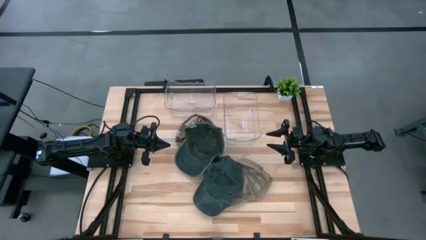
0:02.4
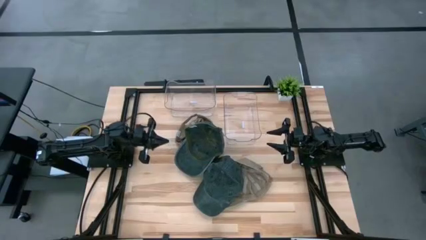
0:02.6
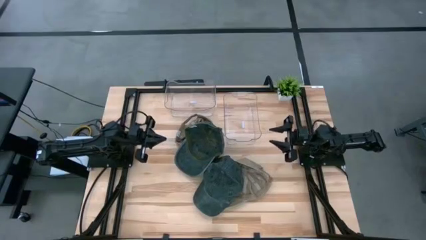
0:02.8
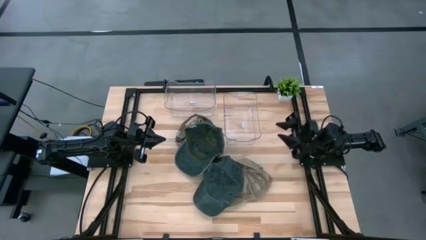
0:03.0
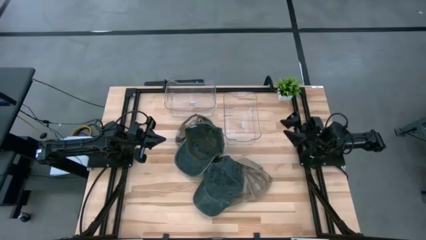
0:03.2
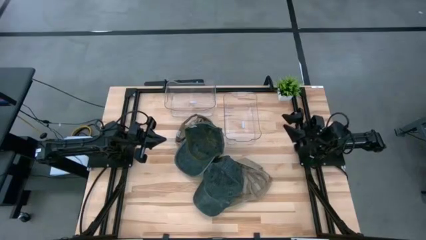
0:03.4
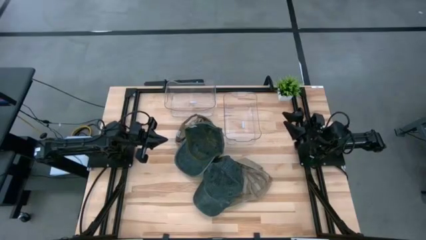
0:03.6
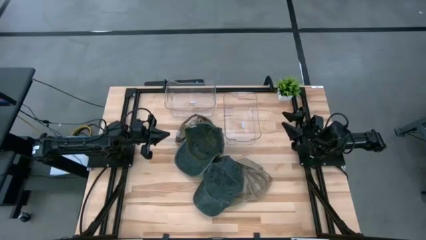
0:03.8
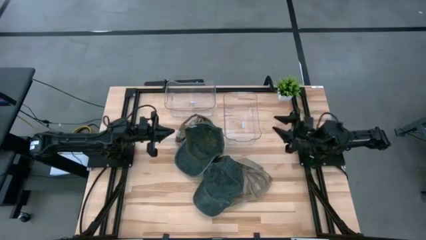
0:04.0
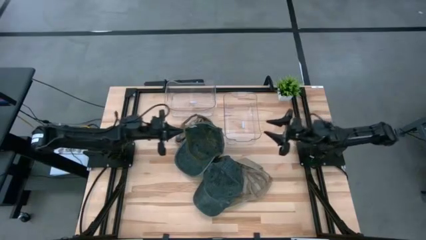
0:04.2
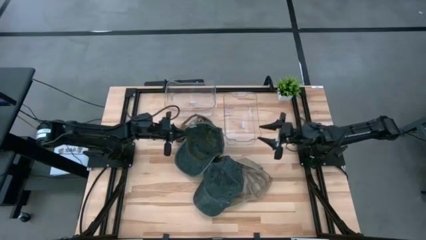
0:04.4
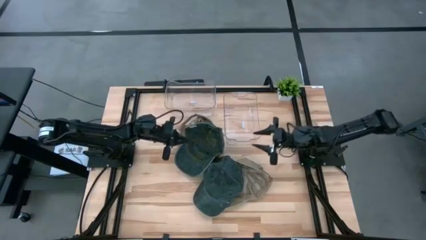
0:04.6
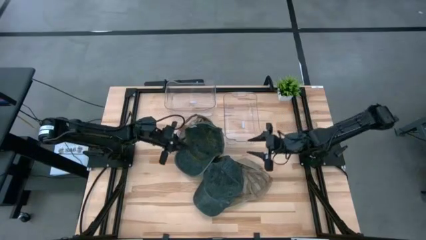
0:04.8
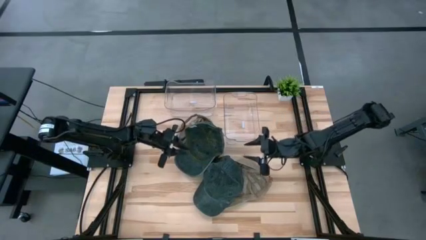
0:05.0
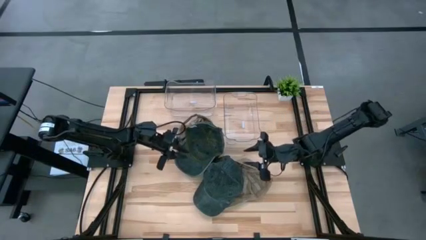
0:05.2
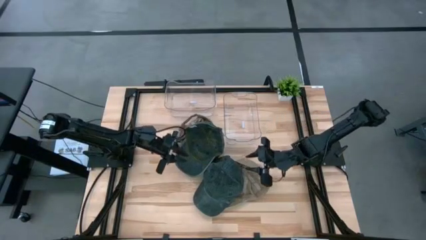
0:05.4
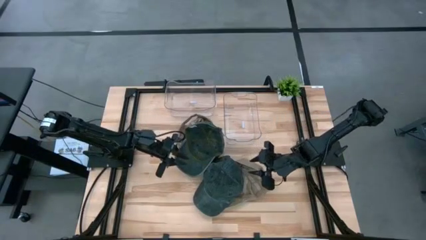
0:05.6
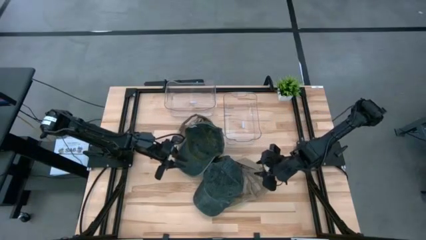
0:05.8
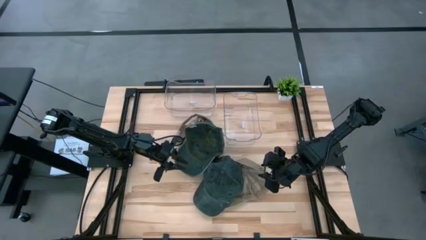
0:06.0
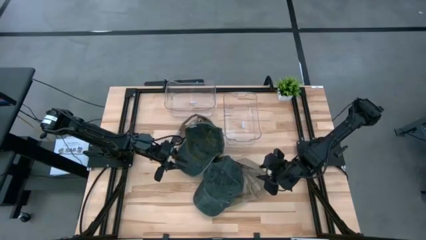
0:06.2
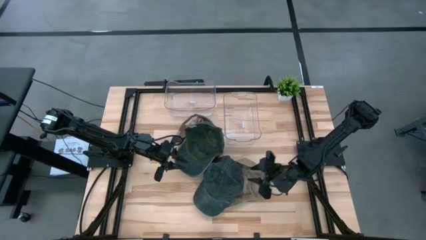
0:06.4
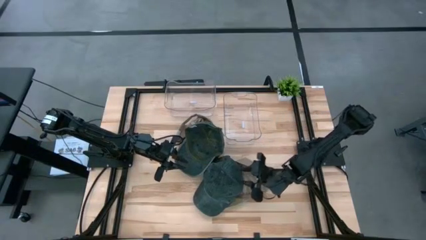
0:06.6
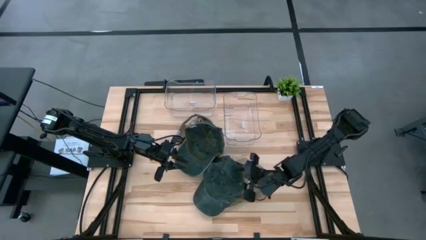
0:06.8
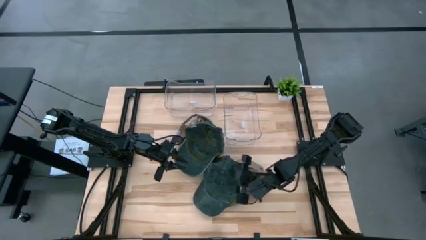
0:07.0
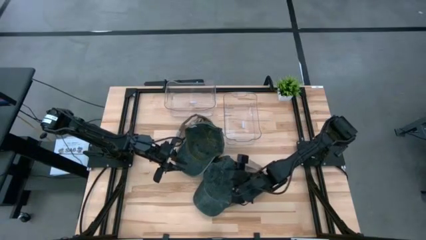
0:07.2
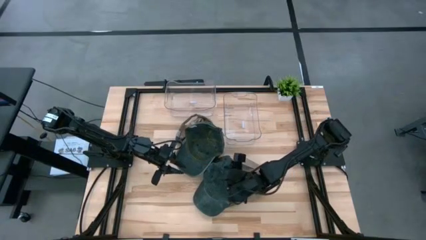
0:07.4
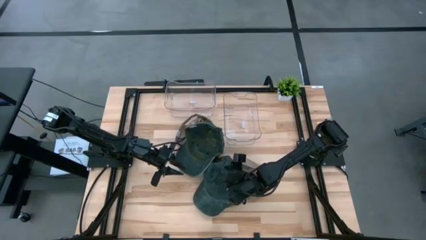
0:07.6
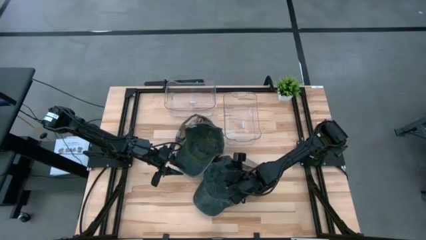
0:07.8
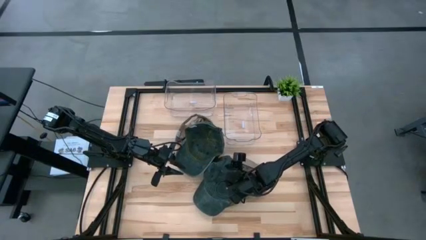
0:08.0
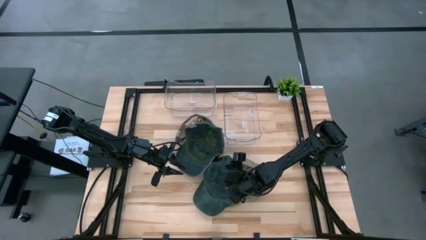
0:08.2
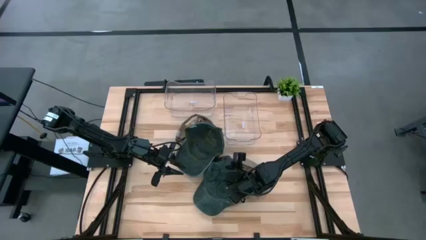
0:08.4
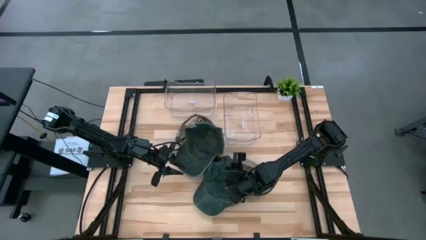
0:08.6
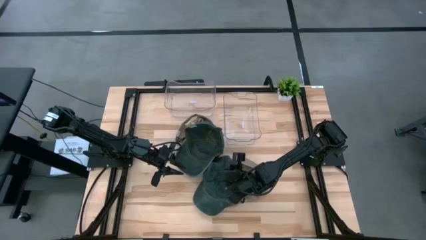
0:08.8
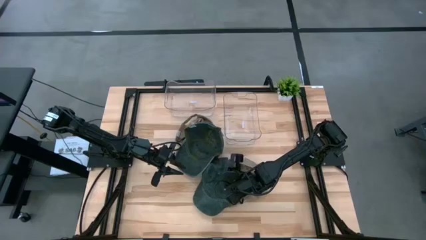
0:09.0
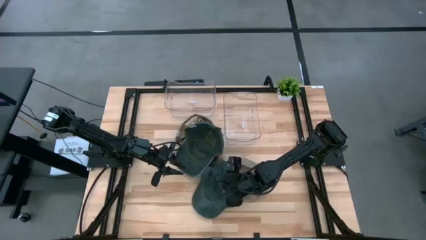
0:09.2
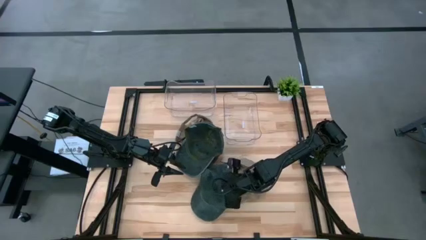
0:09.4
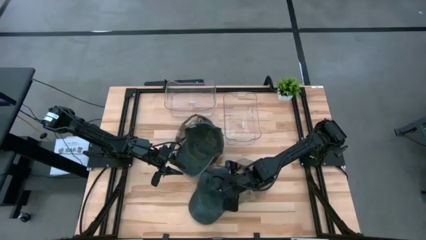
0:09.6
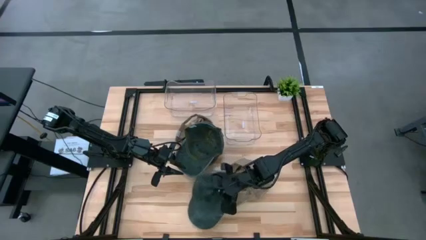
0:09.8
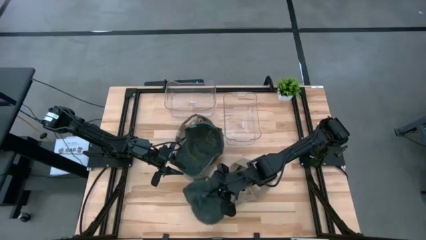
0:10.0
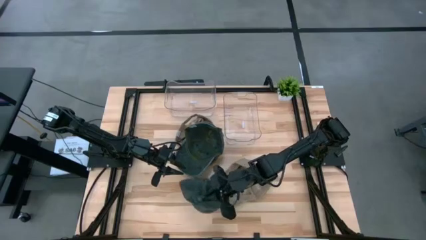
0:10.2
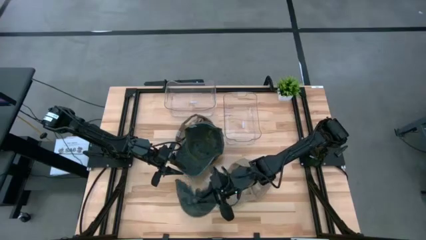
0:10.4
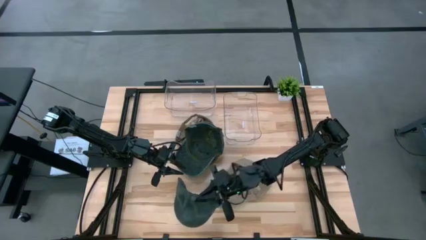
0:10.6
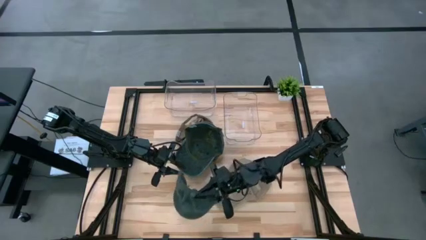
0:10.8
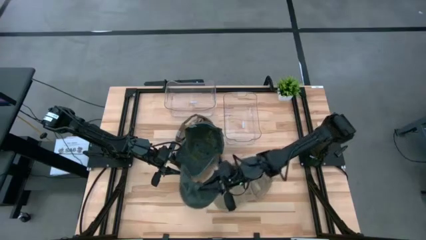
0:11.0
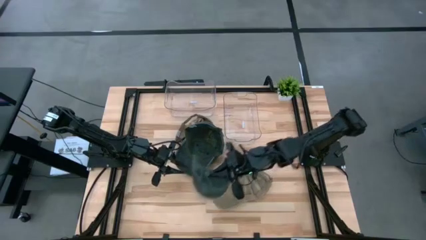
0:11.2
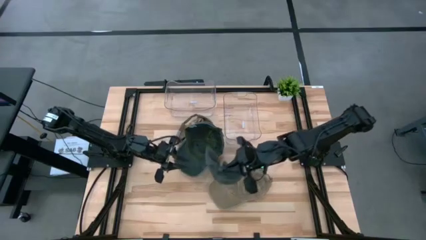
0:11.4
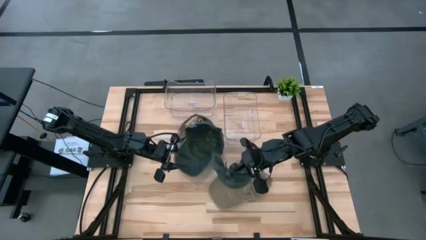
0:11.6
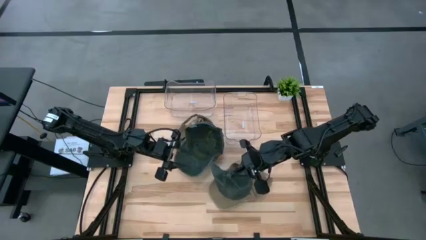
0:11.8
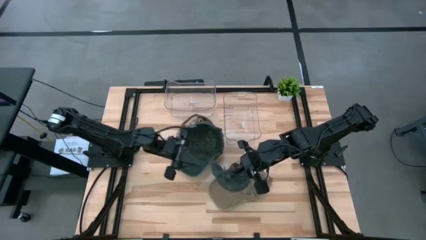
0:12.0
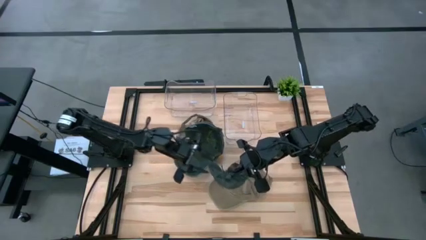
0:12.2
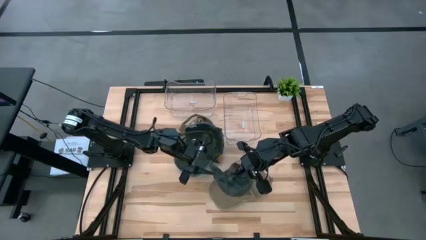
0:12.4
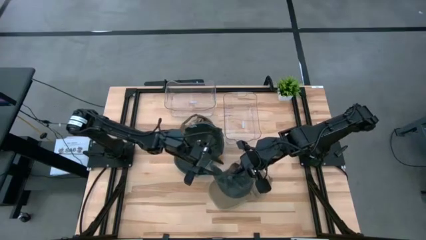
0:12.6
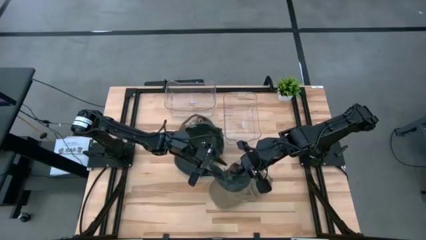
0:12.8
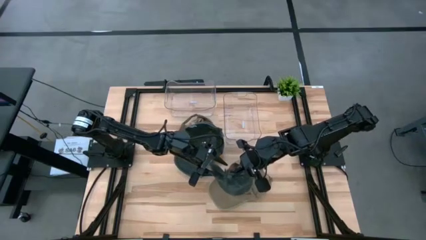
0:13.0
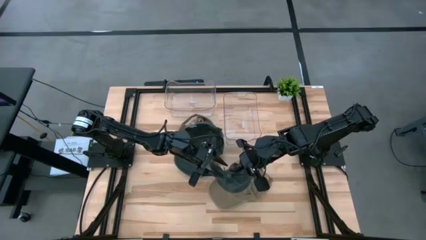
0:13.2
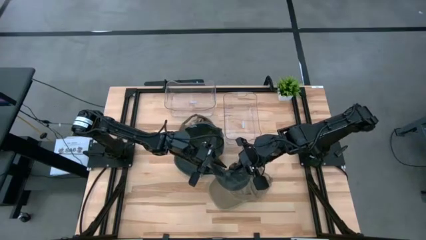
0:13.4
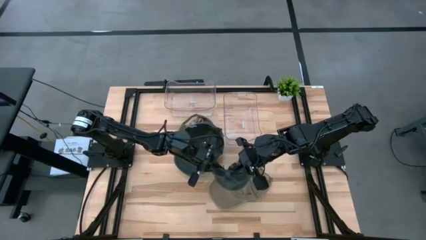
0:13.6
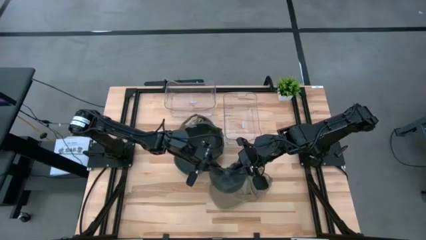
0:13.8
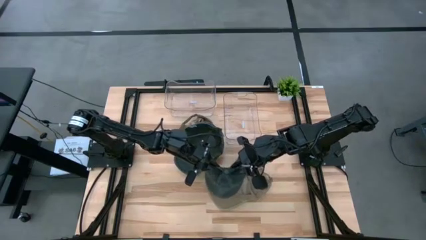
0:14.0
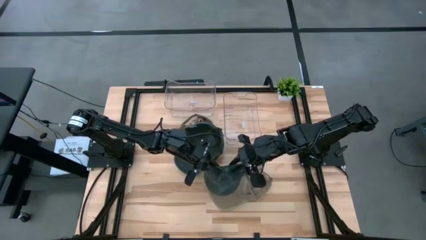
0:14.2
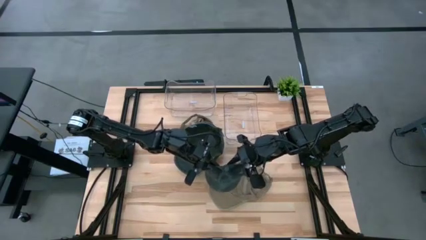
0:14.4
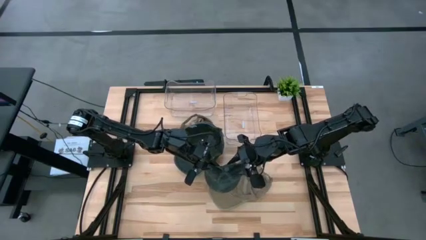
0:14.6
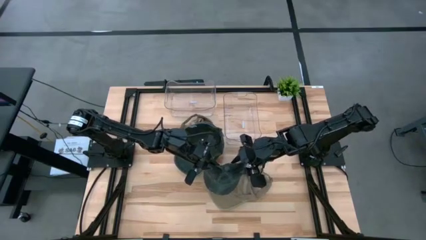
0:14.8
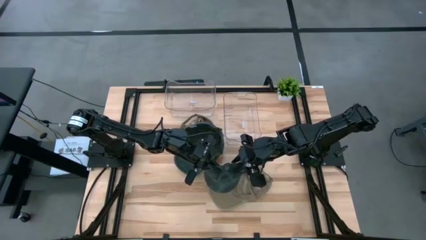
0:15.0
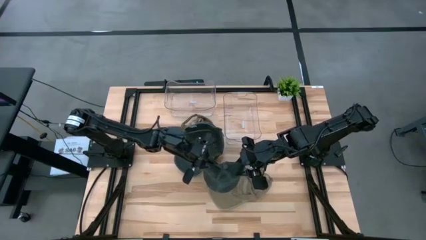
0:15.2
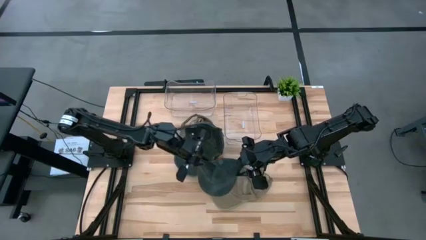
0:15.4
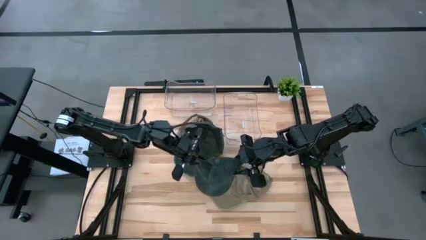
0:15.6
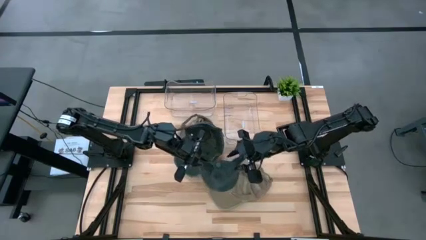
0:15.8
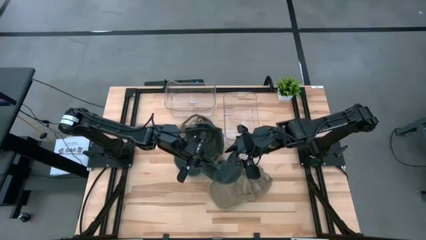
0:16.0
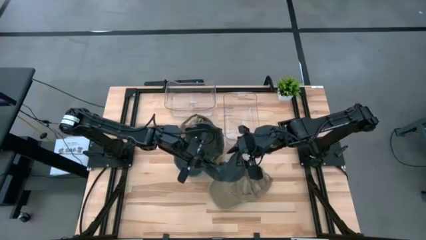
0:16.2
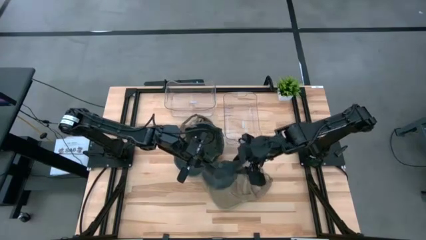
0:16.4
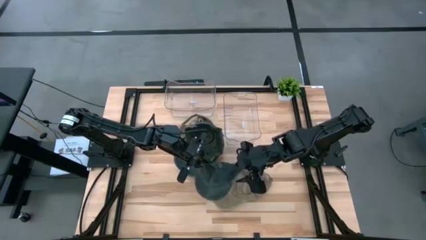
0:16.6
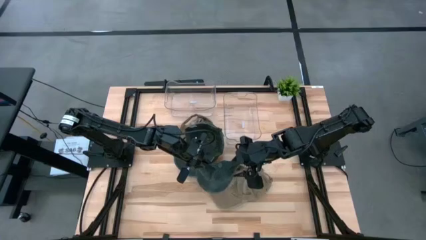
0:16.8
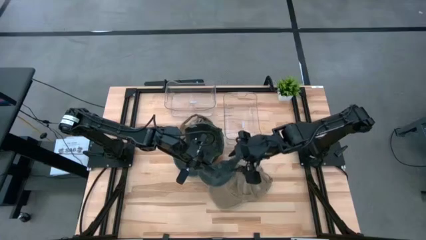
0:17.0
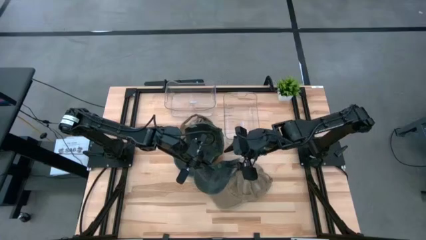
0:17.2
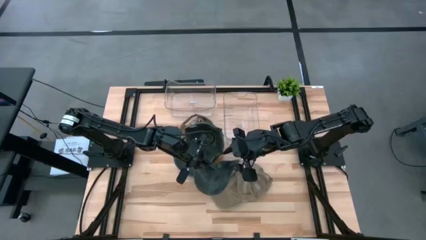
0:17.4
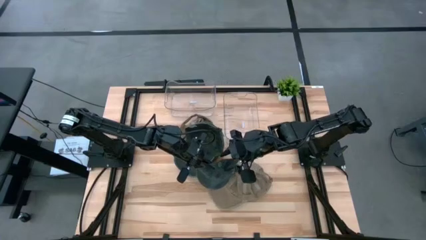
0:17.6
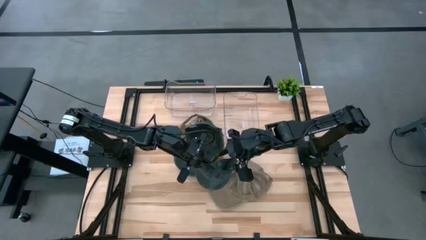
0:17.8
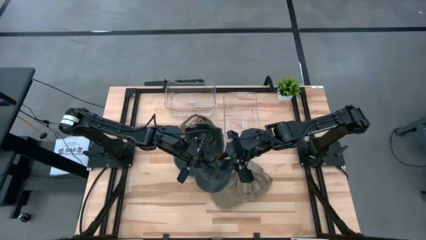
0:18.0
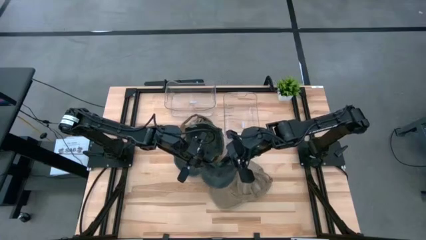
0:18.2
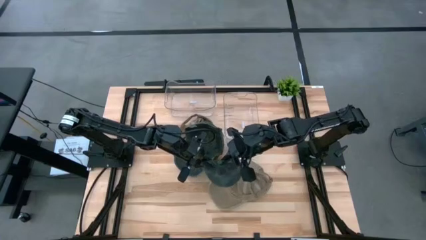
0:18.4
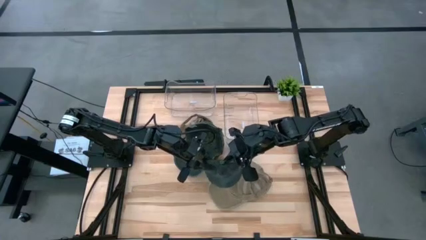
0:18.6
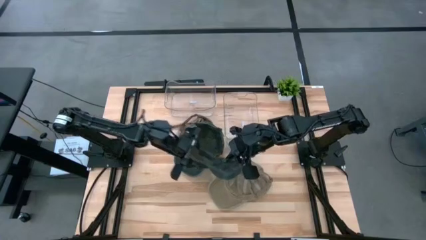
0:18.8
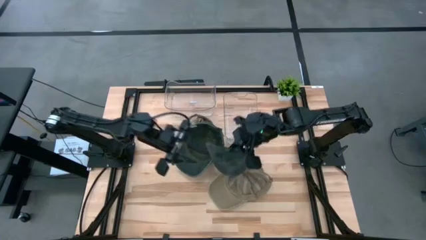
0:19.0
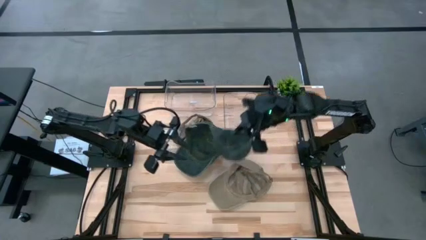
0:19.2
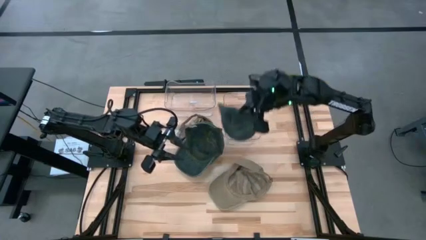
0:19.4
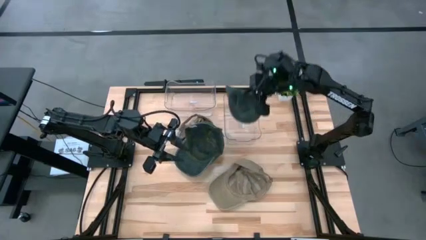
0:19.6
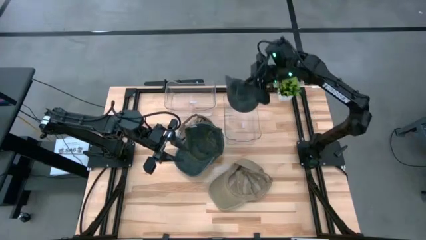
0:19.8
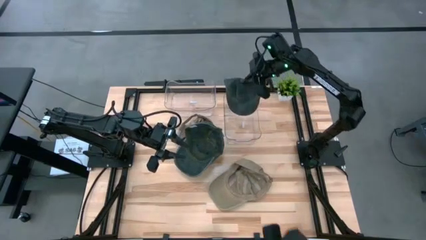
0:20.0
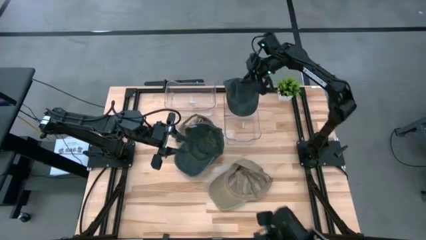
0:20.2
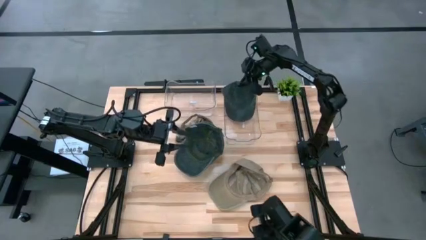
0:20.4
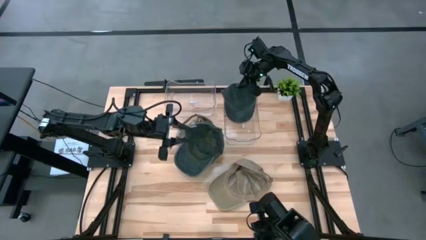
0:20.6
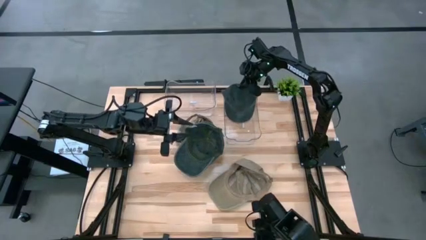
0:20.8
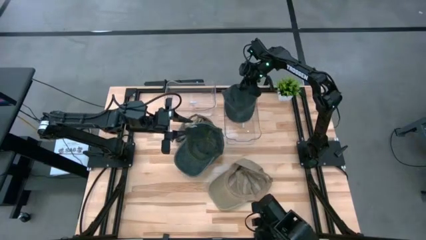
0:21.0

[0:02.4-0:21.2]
Task: Pick & Place hat
Put the bottom gray cap into the right transparent bin
